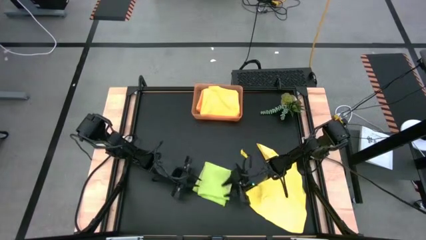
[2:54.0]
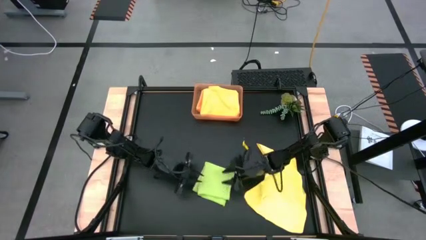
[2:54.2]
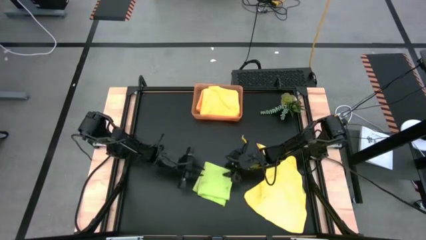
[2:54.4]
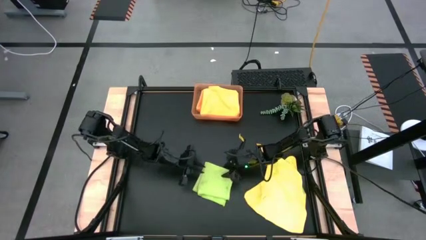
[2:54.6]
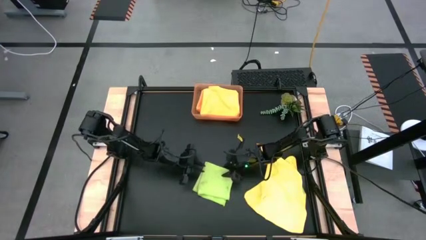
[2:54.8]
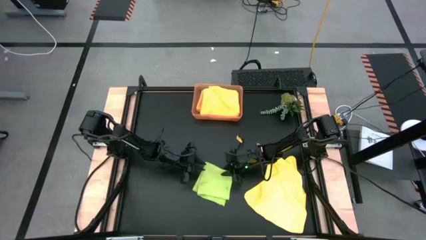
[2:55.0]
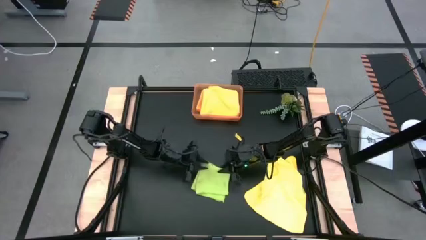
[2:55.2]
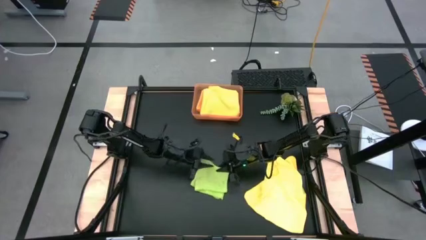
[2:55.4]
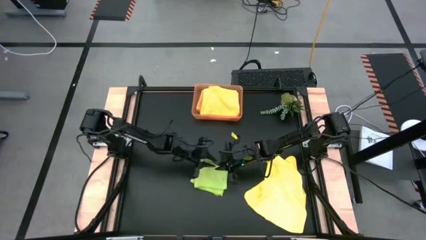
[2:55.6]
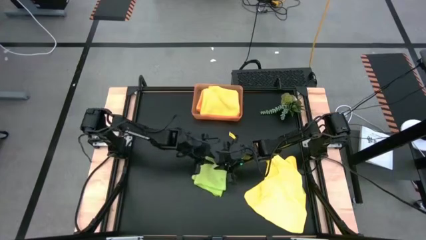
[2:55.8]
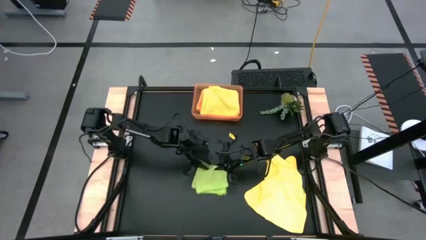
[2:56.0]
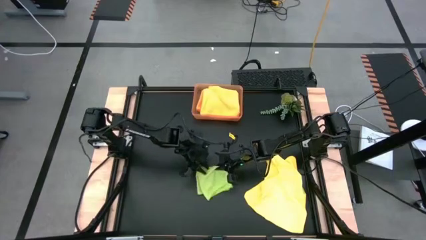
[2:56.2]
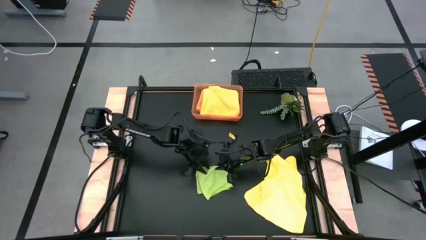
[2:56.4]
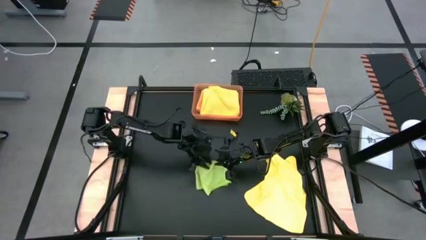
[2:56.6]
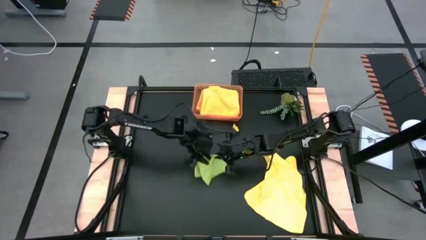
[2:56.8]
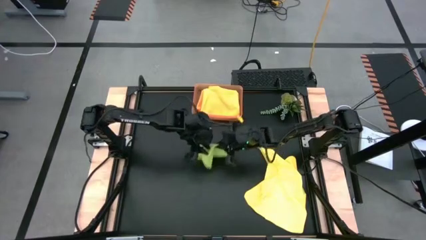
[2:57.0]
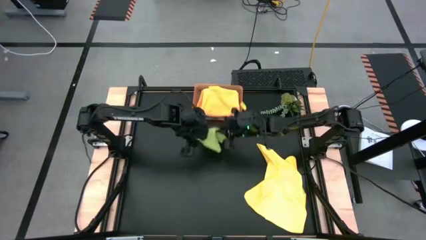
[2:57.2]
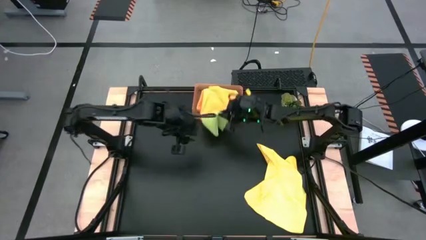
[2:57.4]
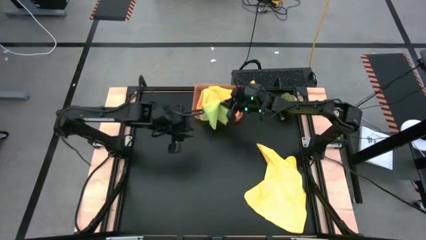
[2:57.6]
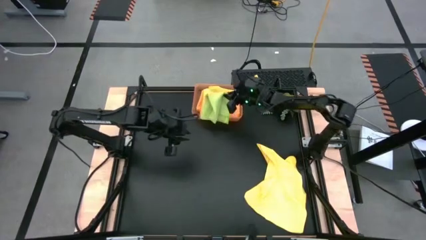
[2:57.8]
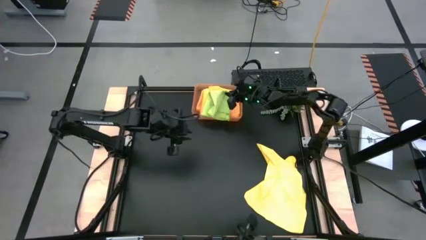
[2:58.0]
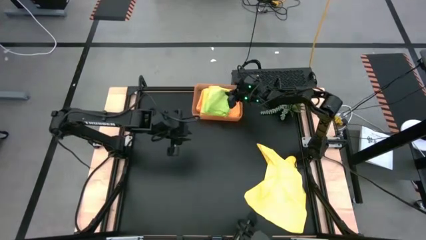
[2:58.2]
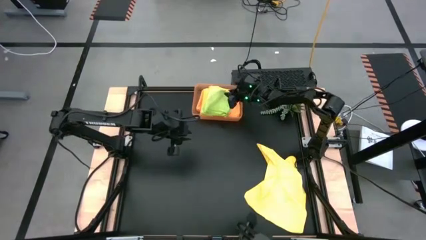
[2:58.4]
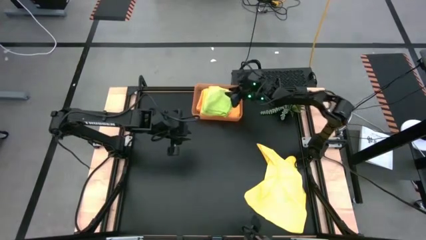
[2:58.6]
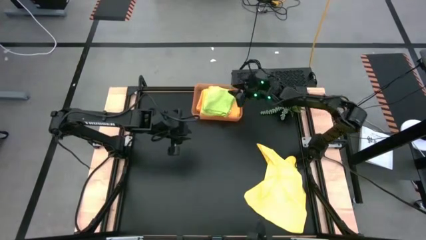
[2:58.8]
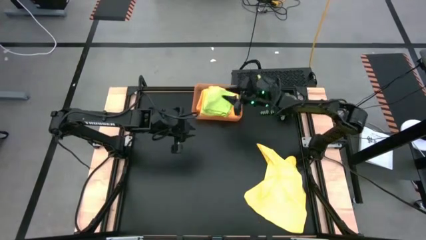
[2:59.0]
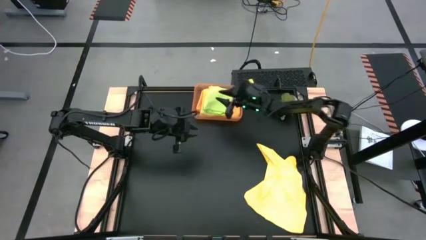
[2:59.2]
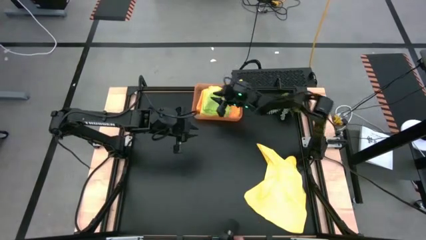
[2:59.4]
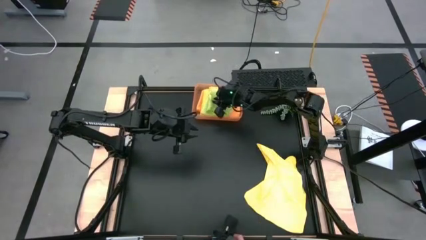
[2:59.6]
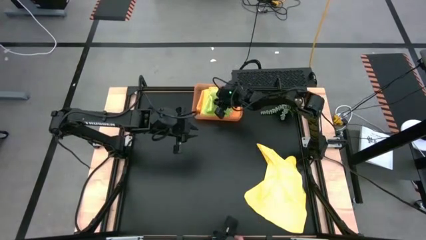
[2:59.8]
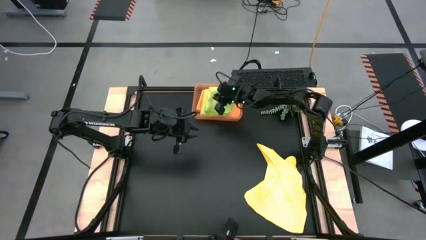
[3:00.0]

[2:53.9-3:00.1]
Task: Fold microfiber towels
Put the folded green towel into the orange bin

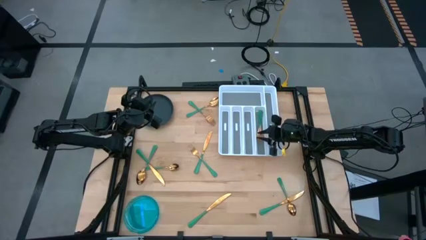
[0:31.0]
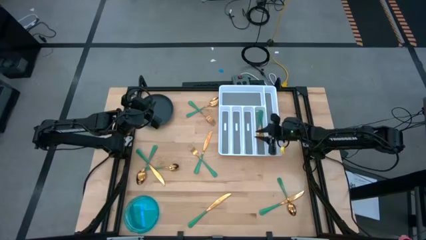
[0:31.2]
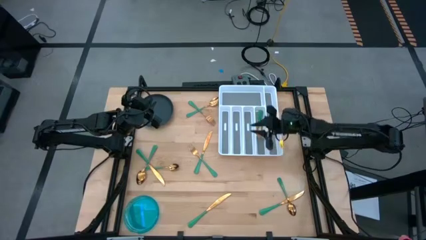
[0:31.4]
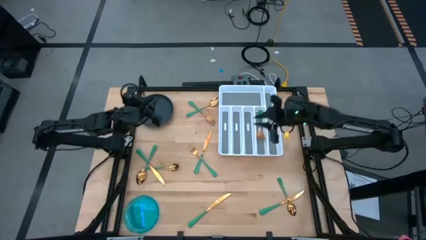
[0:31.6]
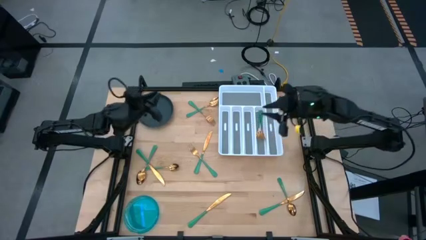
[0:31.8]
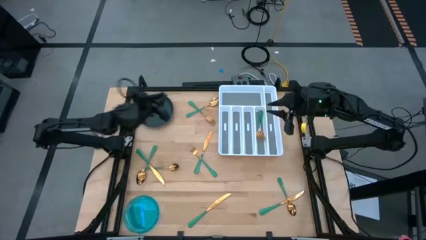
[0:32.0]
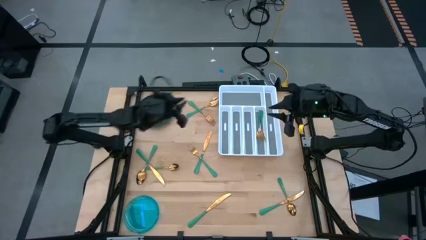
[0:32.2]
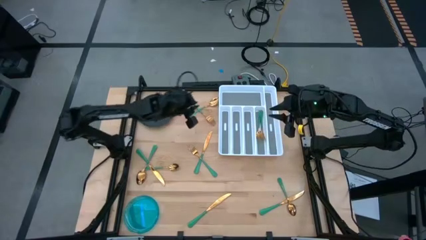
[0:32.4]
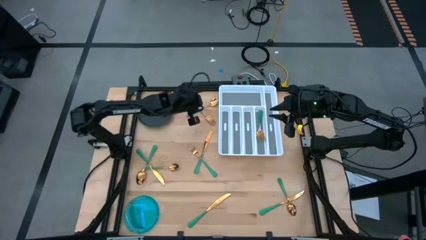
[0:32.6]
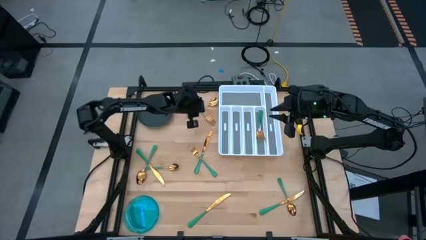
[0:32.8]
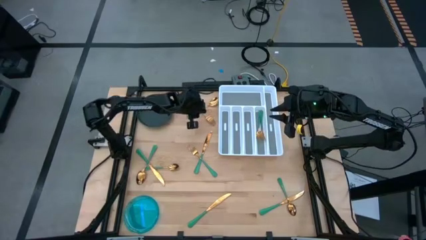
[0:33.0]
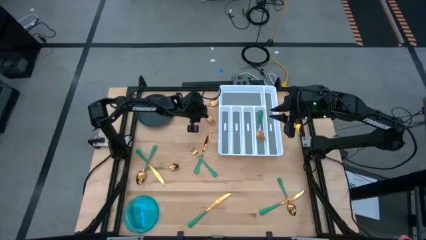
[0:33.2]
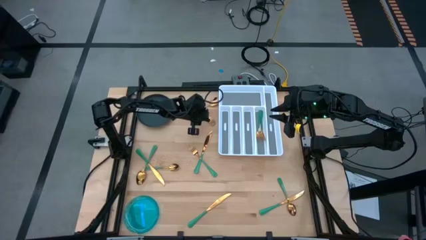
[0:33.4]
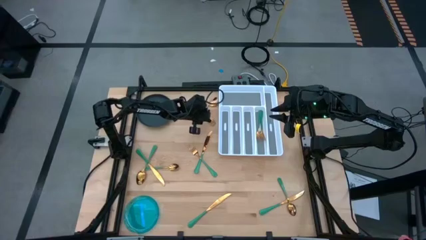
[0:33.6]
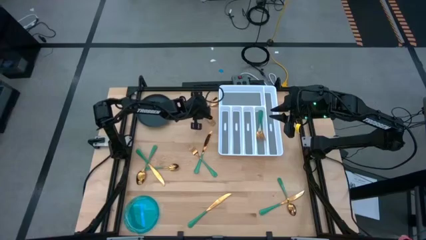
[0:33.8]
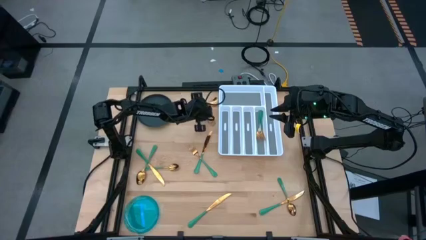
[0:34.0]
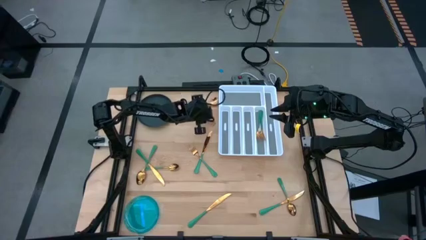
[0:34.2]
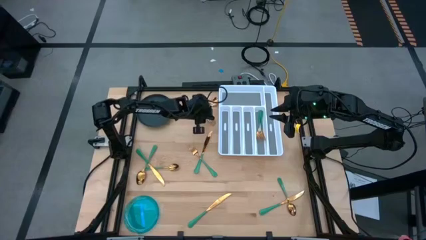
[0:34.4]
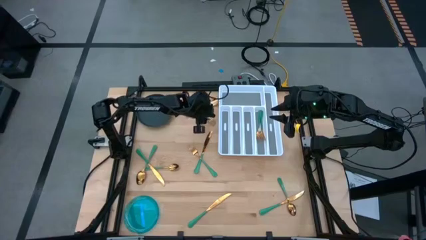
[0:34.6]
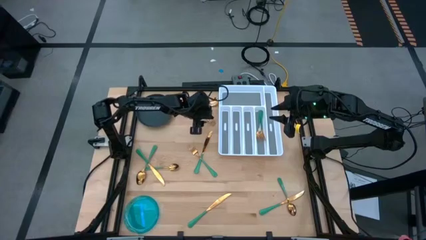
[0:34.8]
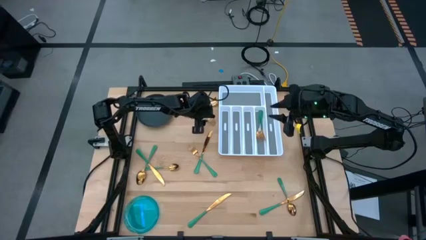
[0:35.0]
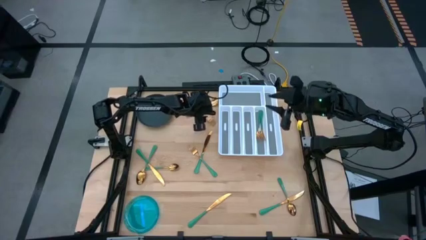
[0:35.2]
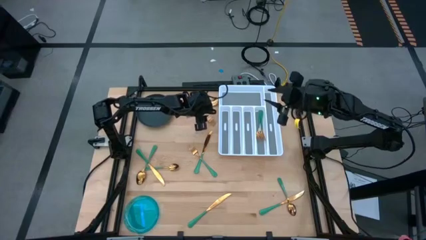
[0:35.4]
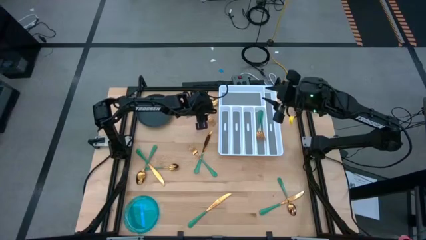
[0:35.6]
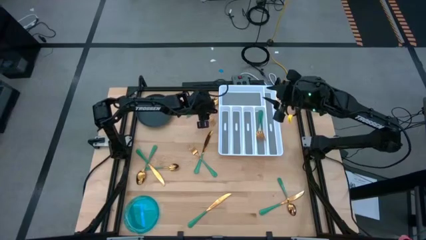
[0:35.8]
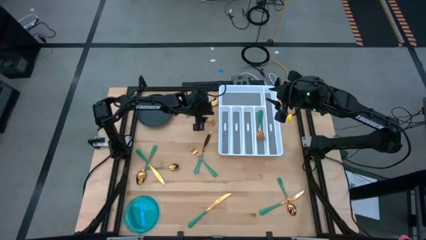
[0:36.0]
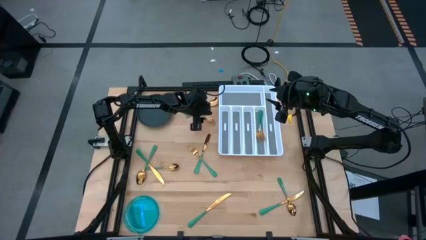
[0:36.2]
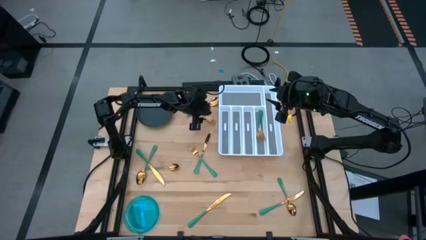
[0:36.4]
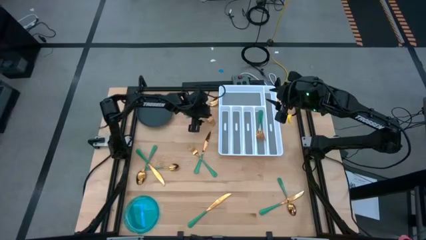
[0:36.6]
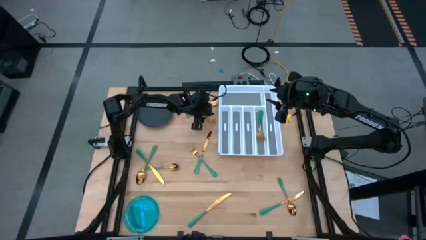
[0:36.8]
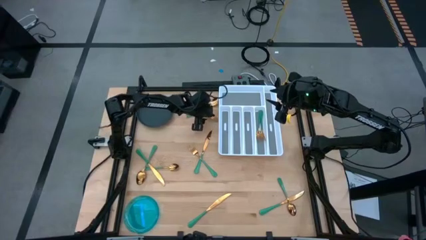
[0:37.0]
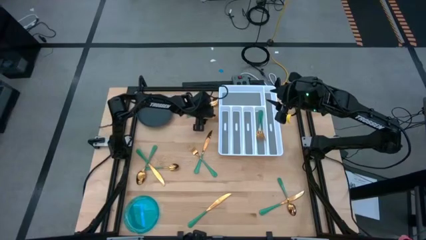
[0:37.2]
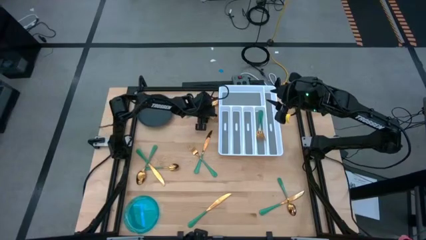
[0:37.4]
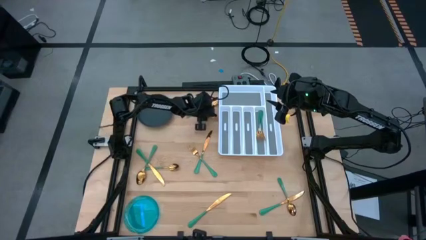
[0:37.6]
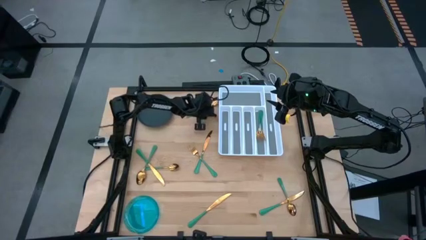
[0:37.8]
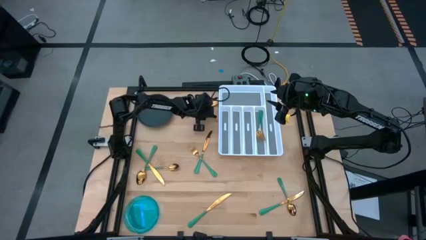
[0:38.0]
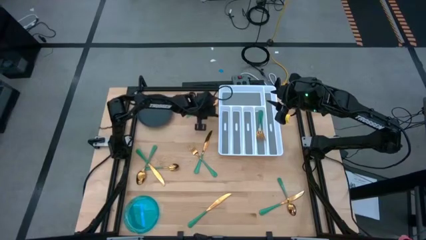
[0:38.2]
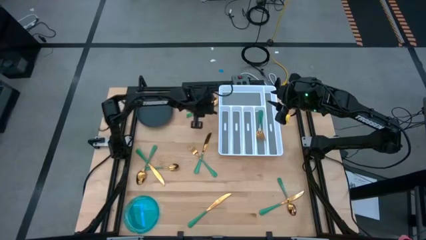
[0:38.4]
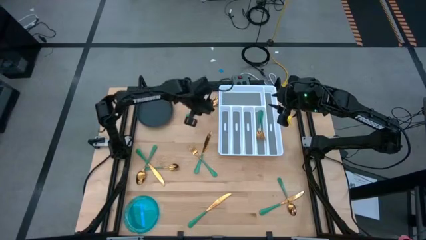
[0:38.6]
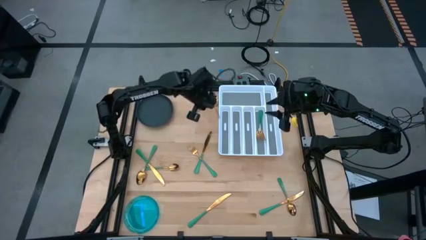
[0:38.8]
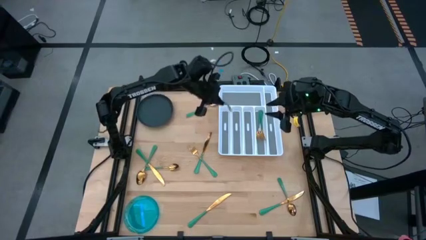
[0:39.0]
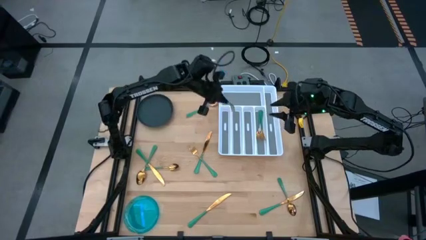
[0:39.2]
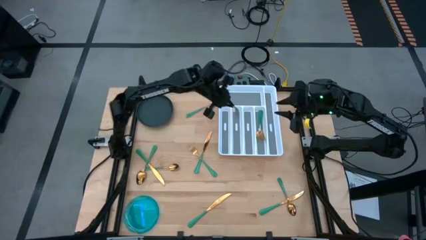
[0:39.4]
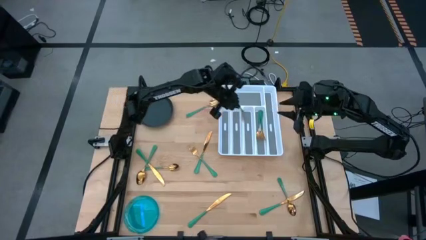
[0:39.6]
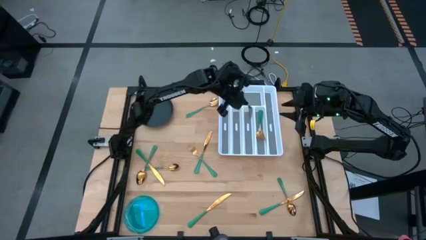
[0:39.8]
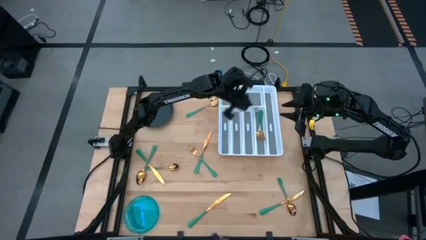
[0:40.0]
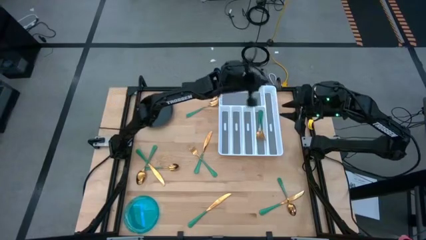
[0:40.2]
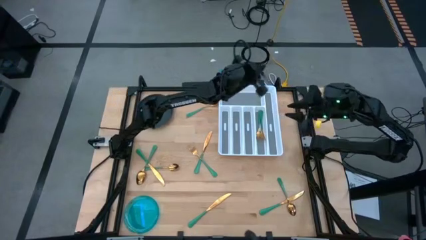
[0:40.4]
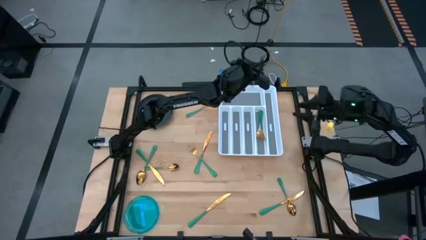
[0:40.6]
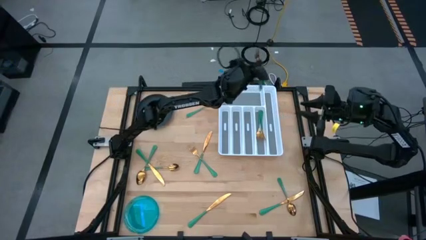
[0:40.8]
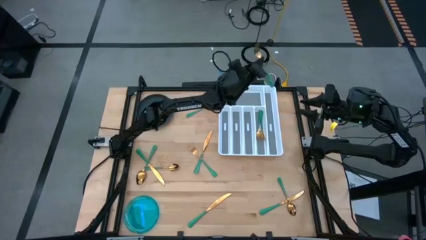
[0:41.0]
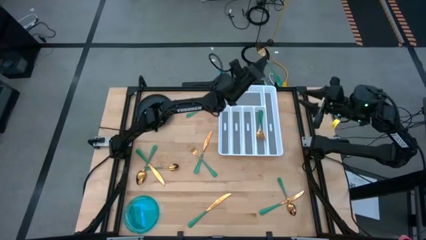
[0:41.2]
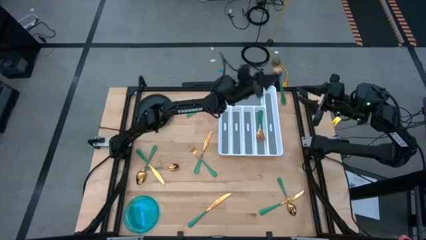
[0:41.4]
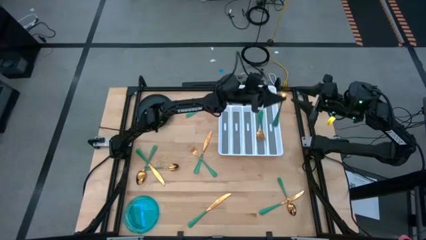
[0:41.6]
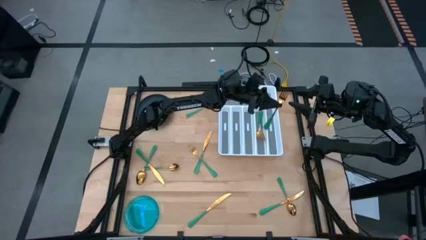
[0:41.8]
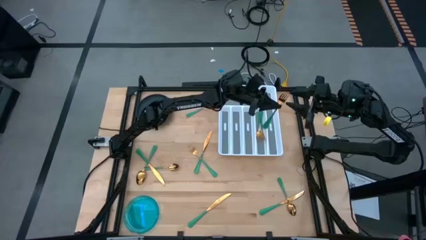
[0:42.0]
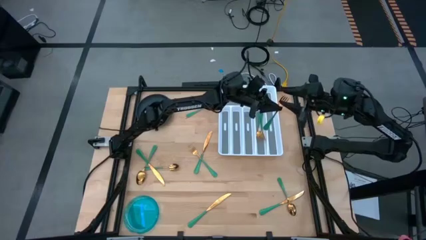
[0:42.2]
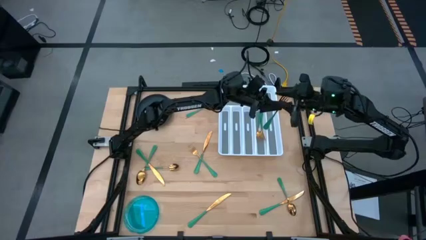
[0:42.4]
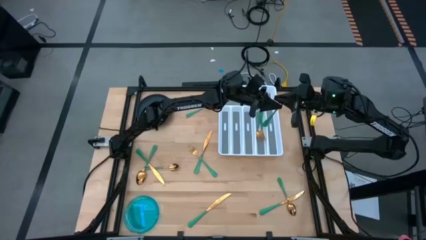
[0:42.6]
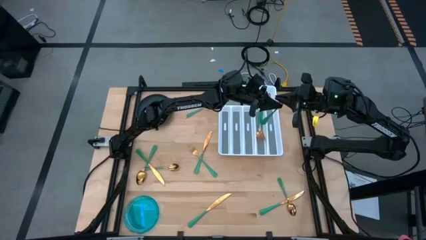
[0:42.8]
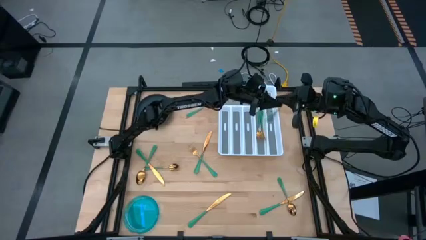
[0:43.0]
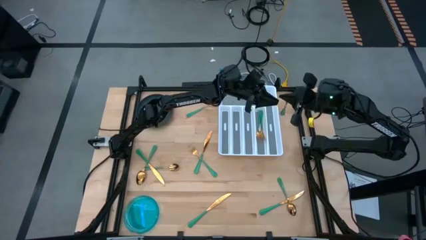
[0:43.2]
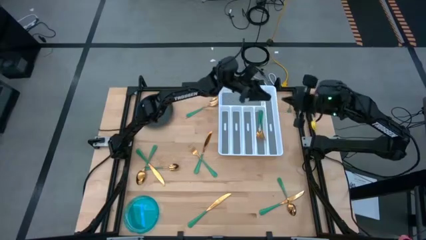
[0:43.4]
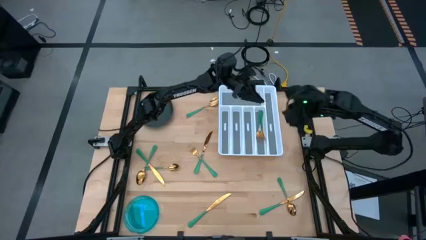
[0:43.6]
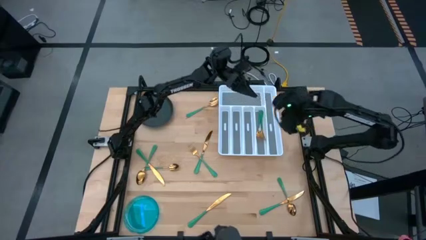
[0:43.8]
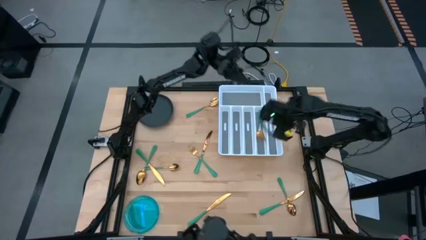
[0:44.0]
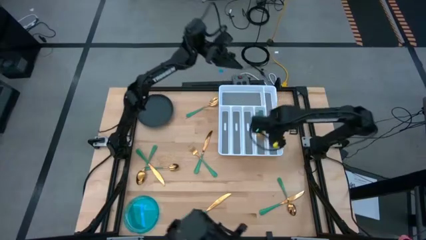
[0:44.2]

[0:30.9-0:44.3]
Task: Sort silverware
Put the top green fork into the silverware tray
